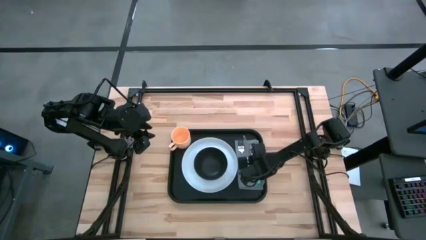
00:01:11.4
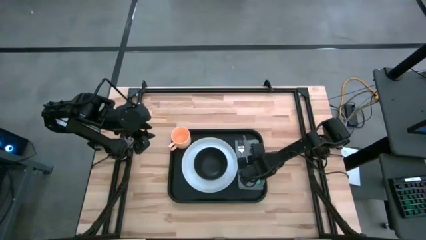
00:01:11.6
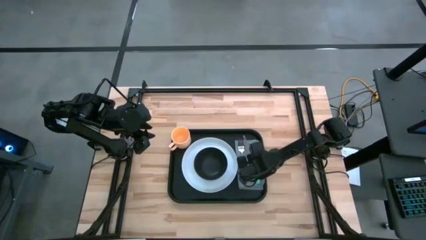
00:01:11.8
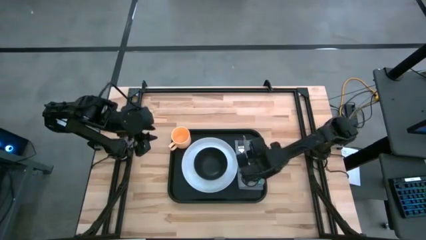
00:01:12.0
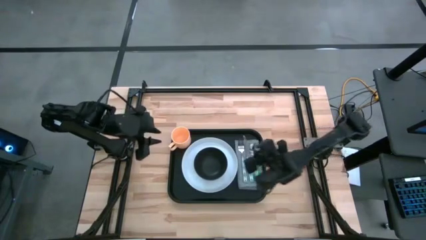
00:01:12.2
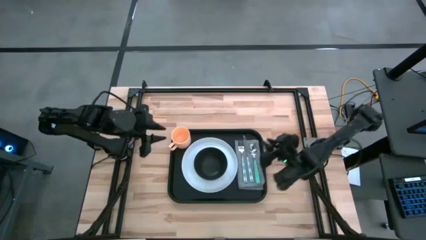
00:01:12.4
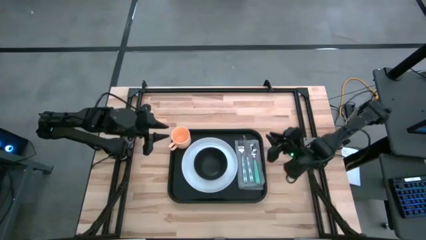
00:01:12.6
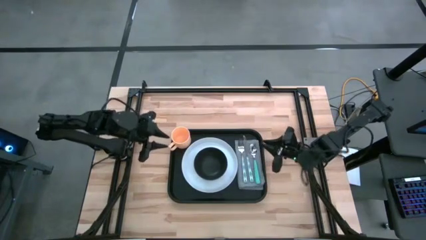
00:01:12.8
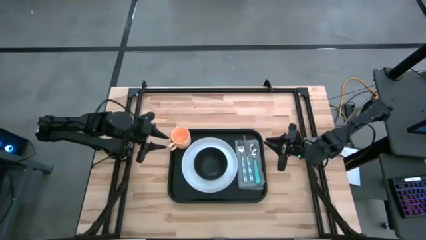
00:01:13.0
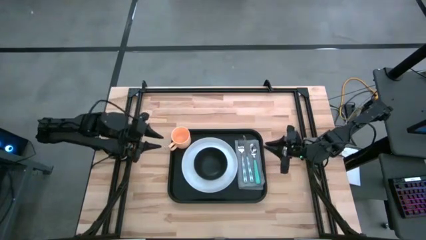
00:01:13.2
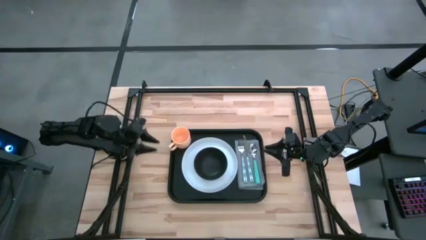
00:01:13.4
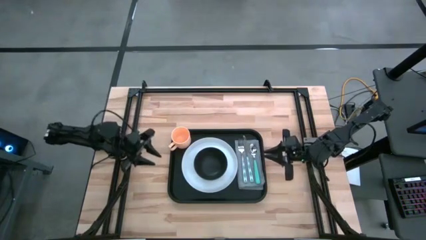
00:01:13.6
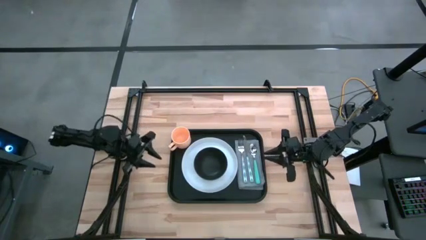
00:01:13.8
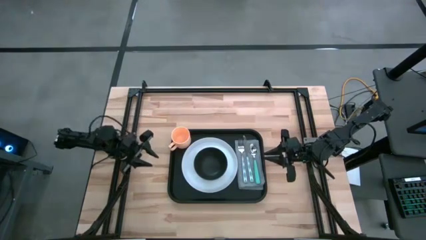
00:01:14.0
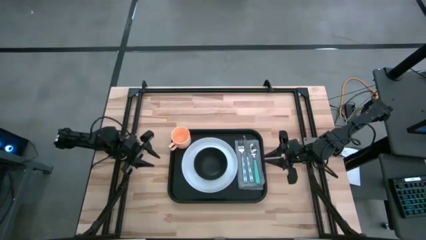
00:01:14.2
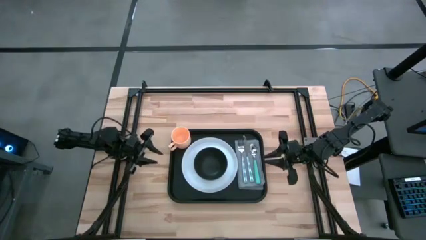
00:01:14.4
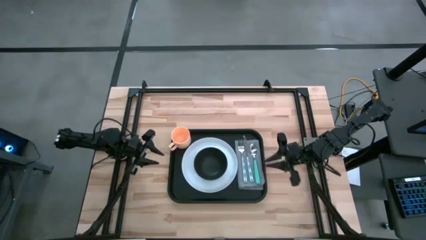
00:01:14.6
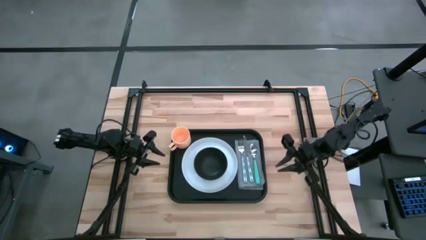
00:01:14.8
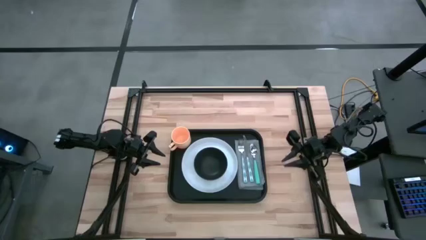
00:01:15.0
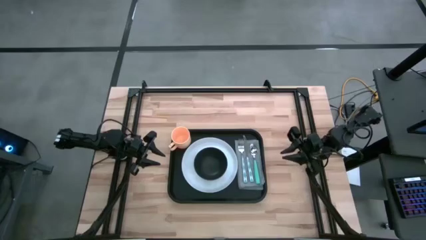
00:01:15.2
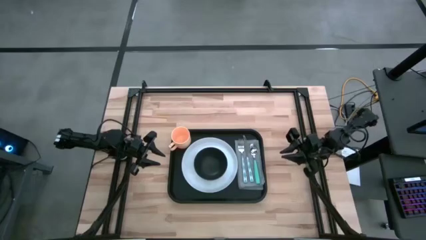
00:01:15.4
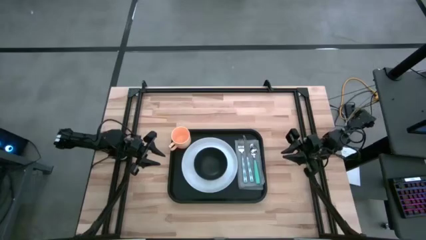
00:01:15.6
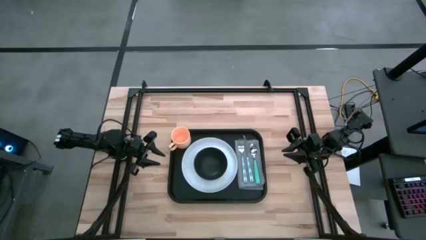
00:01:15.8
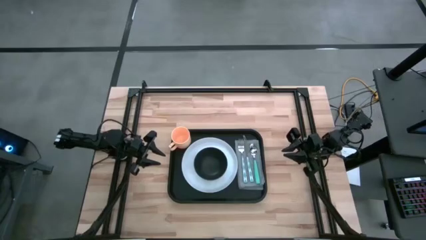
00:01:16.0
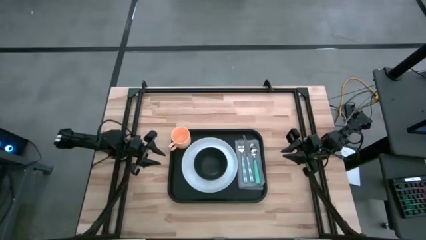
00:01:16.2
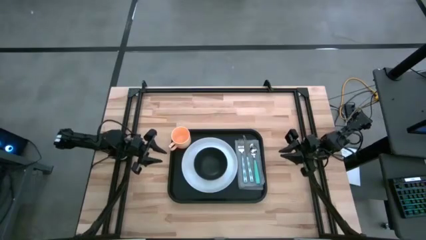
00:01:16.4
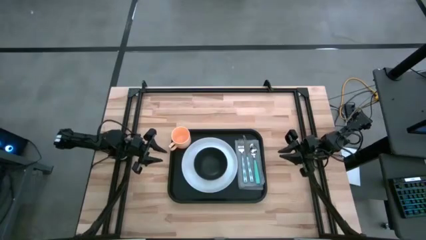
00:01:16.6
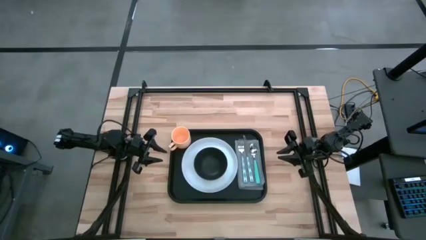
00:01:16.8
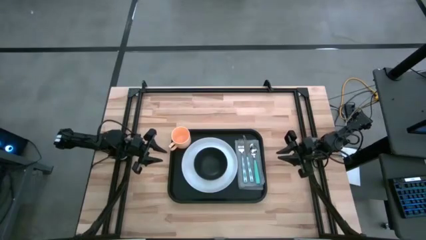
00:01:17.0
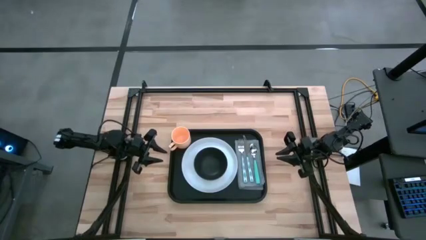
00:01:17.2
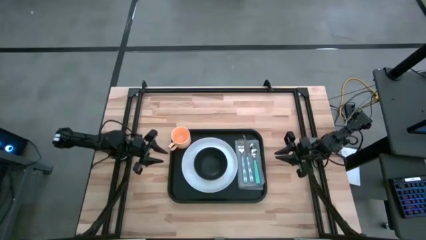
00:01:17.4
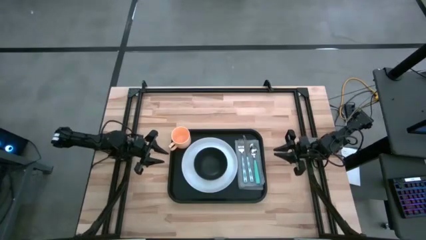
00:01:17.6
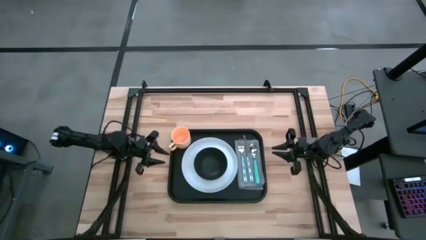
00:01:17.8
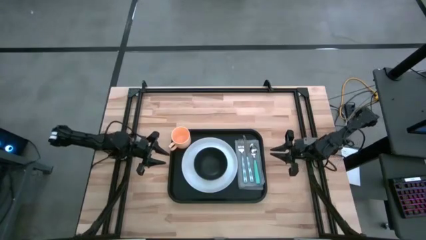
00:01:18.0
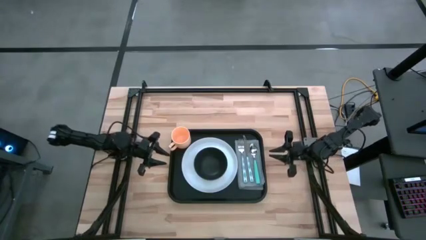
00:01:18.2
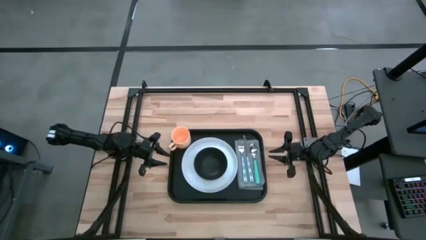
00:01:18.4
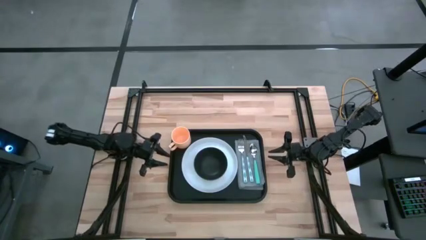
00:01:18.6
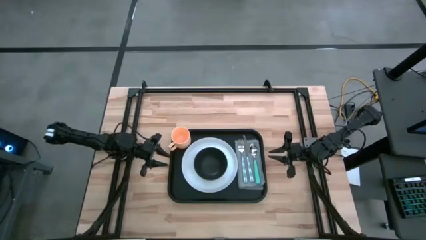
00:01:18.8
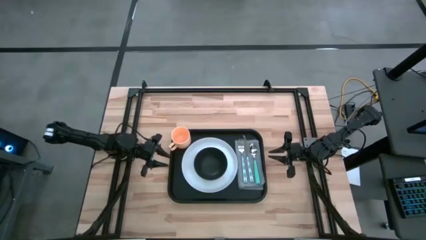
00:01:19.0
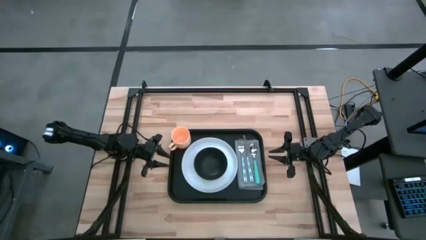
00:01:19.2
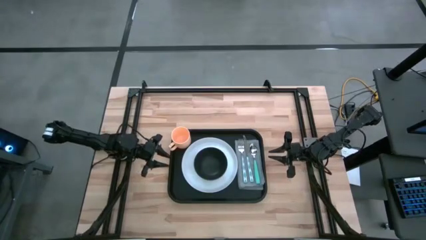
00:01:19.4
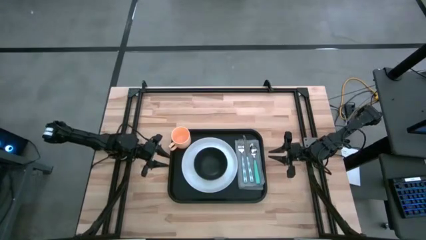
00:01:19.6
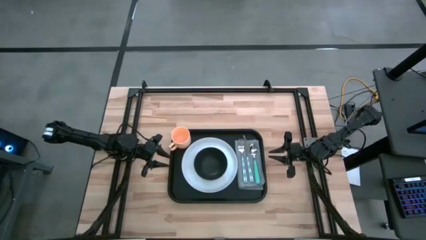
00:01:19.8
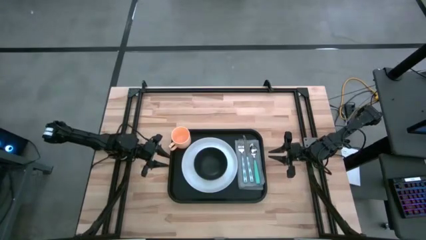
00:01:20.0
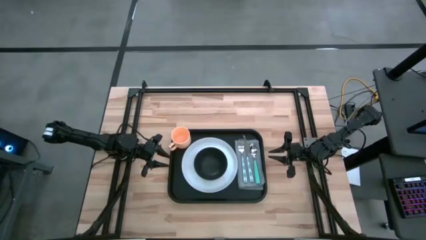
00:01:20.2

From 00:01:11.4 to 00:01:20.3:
Task: Set up tray
Return to Home Position

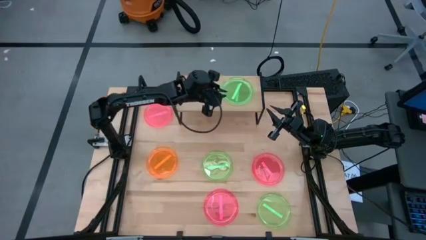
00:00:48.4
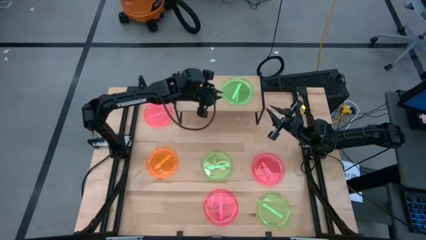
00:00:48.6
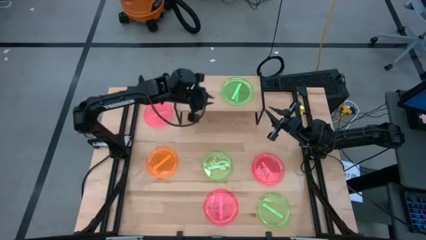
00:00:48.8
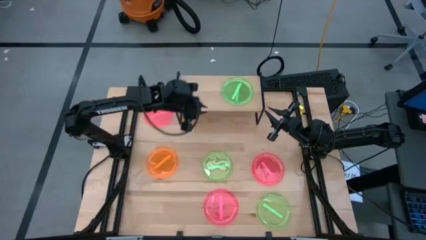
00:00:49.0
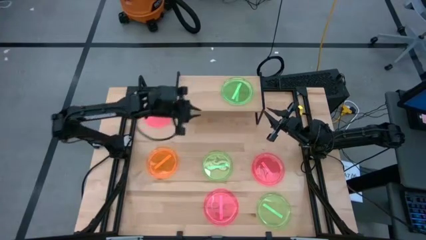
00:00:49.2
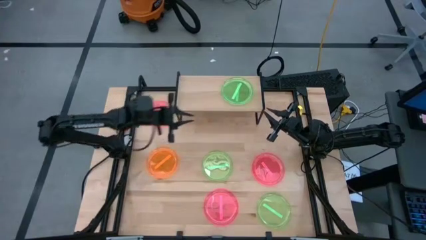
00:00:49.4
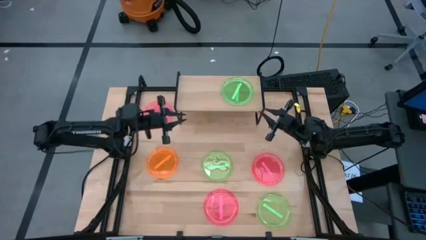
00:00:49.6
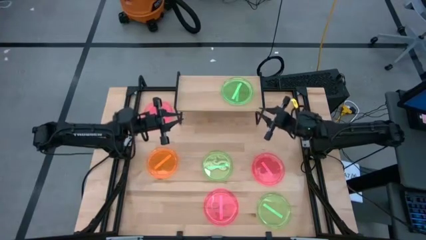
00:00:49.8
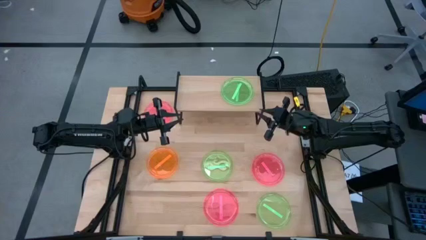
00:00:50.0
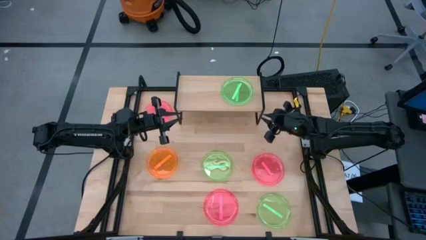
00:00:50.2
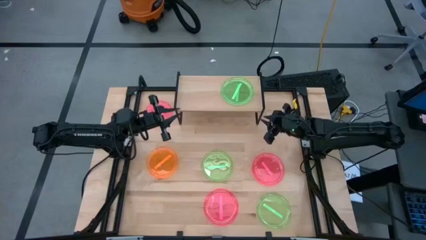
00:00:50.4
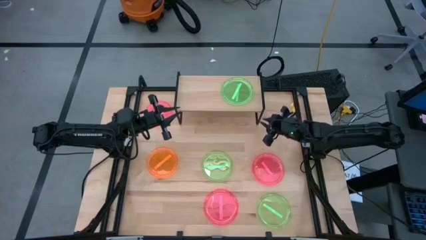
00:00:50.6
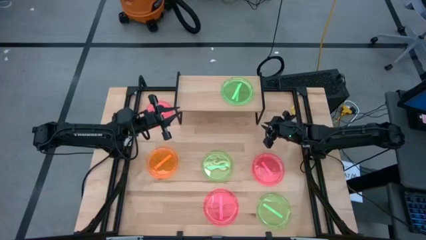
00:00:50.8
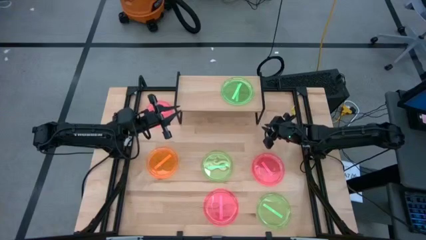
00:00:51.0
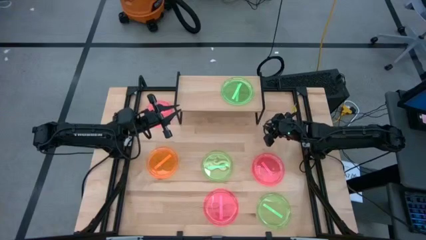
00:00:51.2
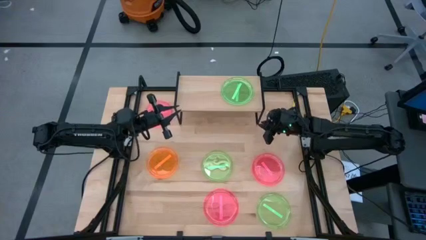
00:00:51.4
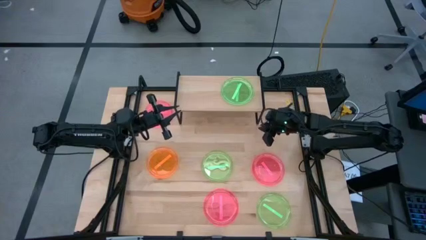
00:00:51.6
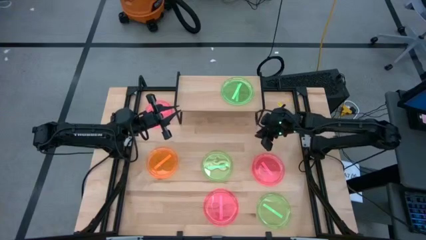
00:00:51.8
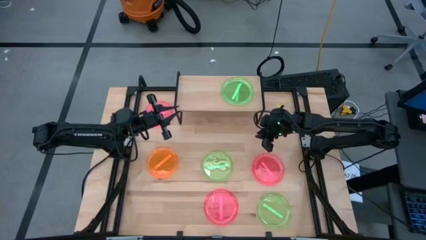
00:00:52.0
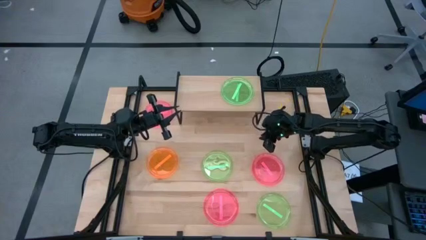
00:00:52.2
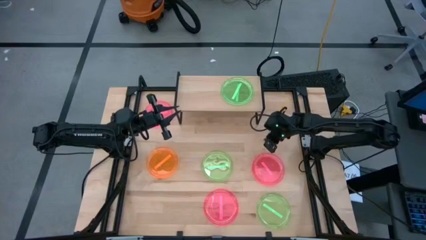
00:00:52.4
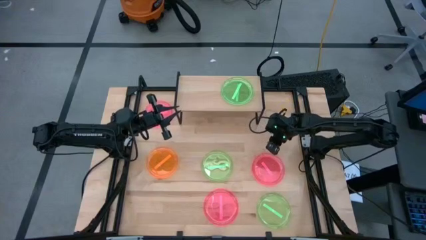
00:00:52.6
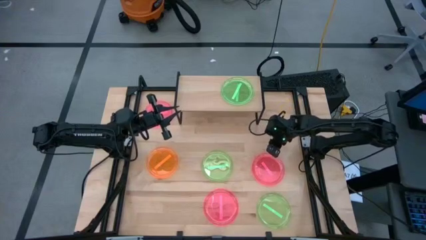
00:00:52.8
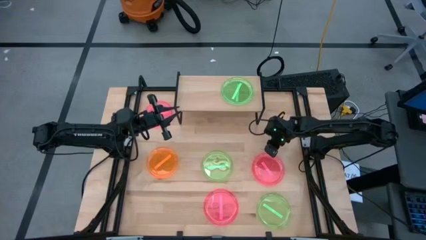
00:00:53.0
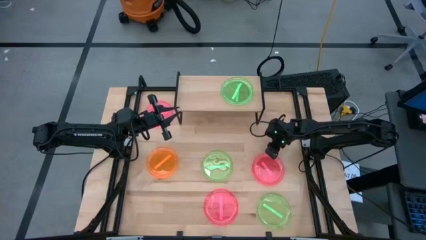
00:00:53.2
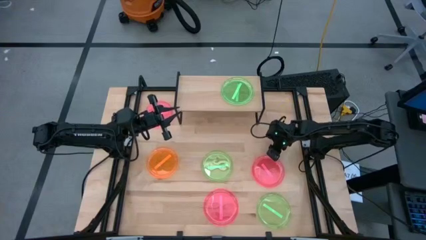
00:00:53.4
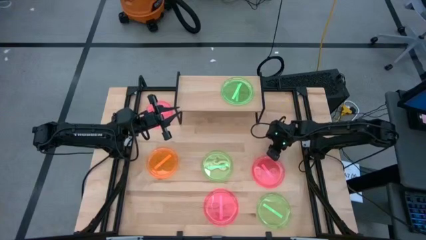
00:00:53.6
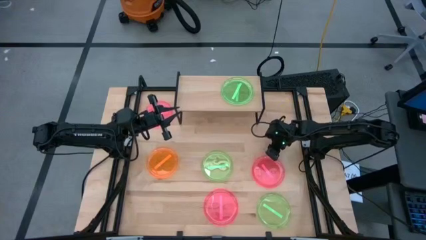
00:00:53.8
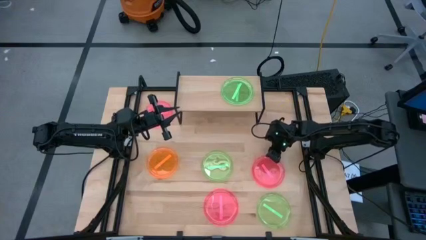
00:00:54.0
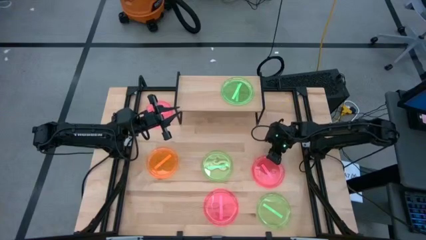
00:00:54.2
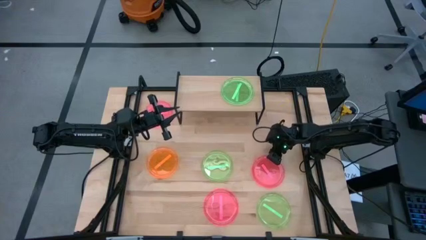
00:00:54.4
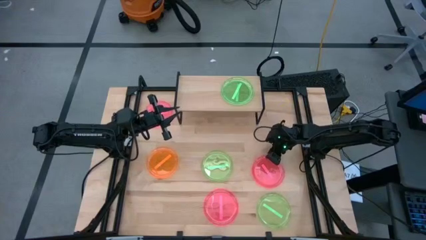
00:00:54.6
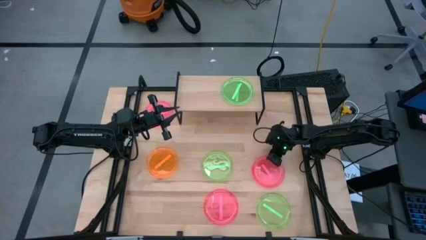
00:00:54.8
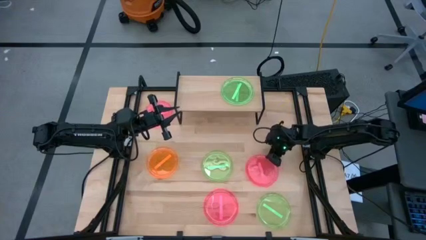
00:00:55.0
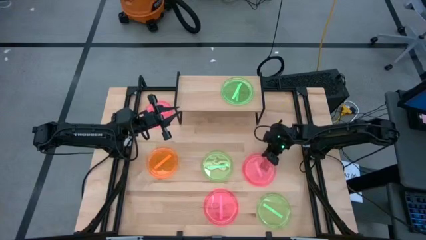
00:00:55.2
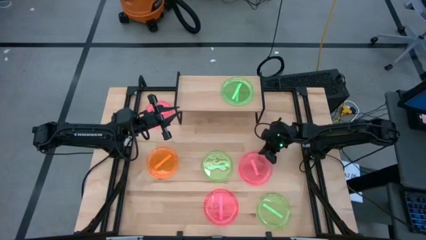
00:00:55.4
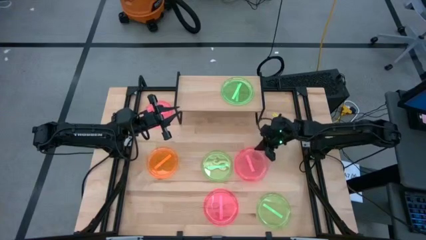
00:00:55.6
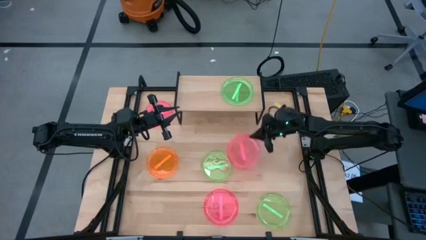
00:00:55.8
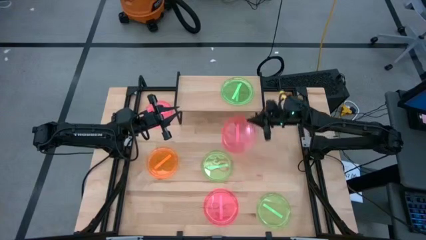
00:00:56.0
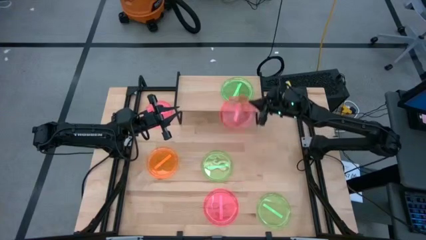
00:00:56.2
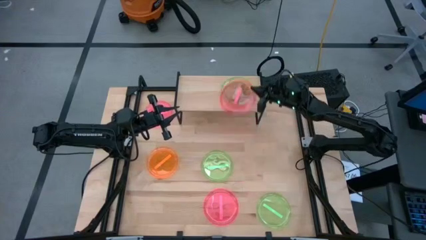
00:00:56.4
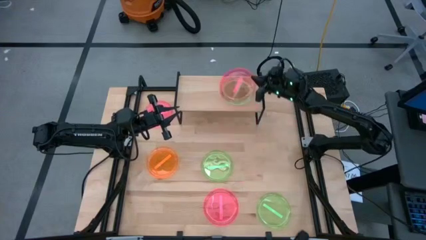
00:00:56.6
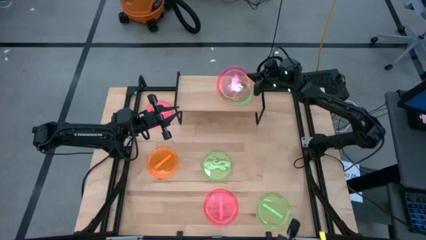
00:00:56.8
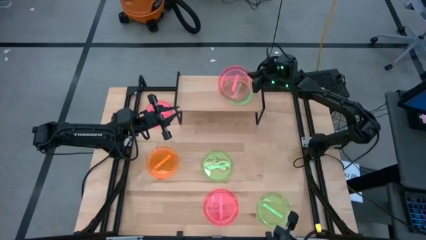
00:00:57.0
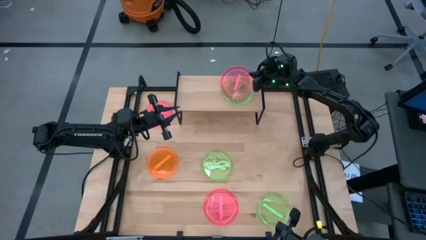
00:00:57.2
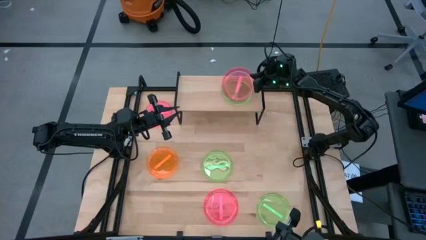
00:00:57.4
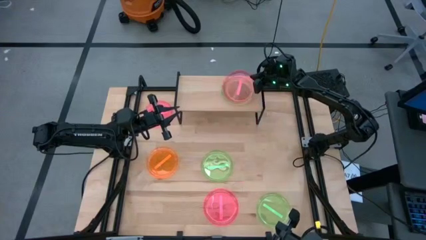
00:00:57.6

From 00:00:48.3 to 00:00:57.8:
Task: Place and stack plates onto a shelf
Stack the pink plate on top of the green plate on the shelf
